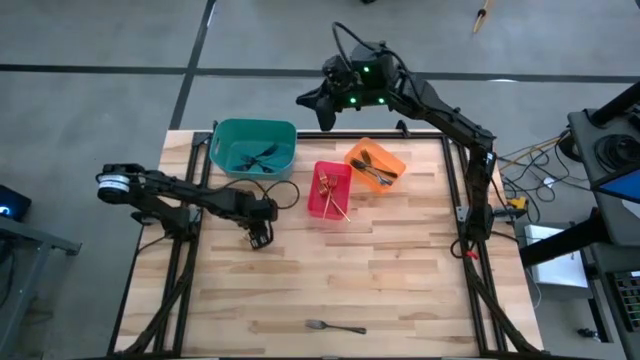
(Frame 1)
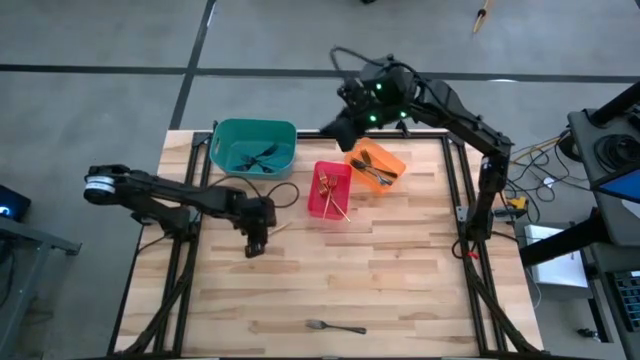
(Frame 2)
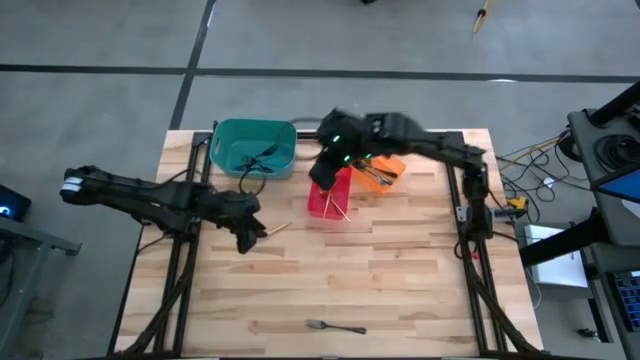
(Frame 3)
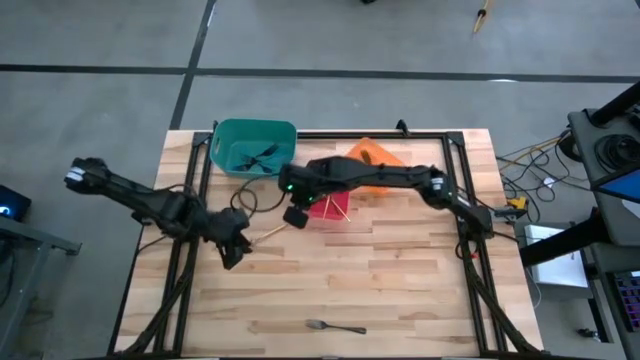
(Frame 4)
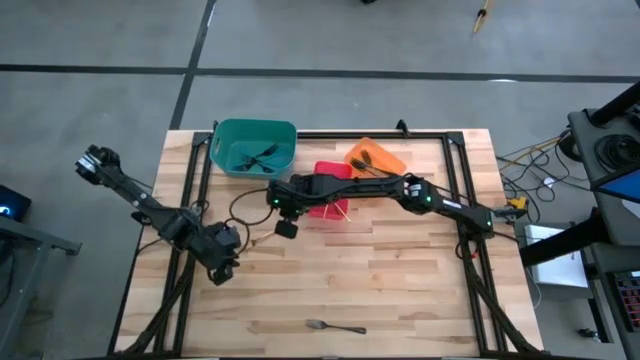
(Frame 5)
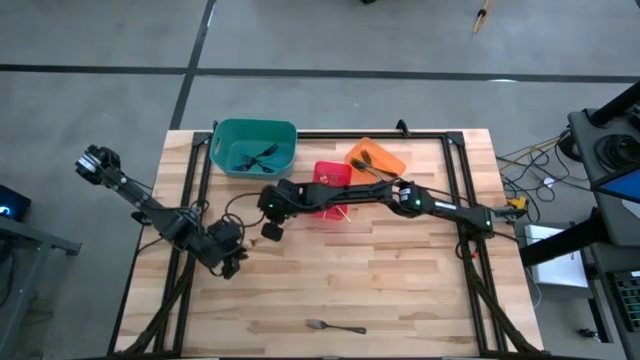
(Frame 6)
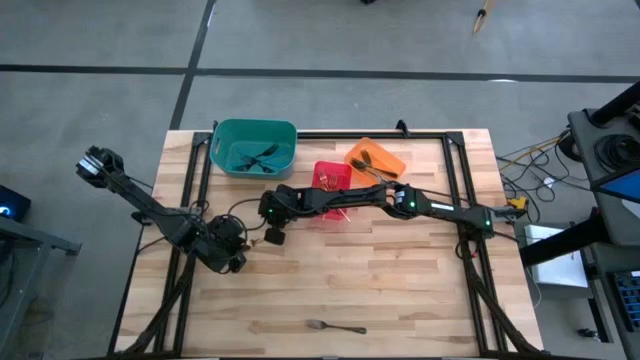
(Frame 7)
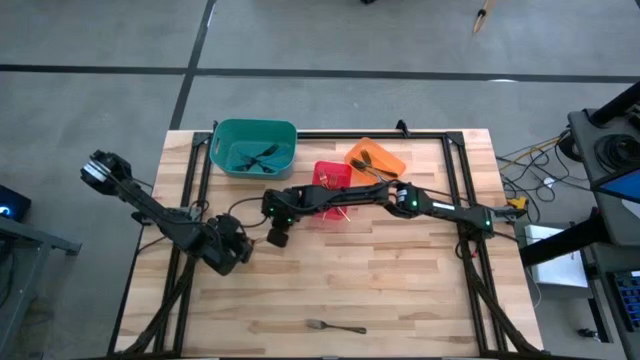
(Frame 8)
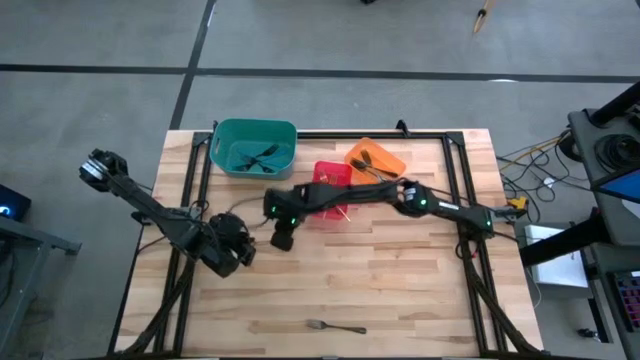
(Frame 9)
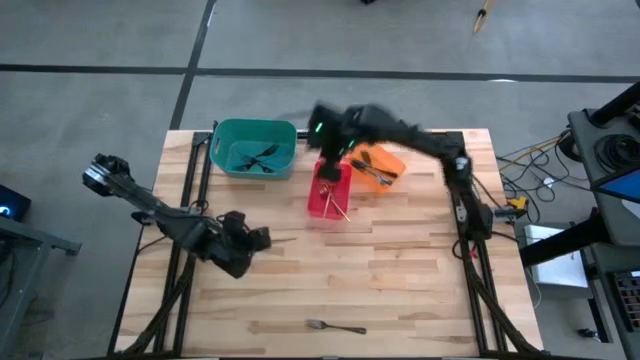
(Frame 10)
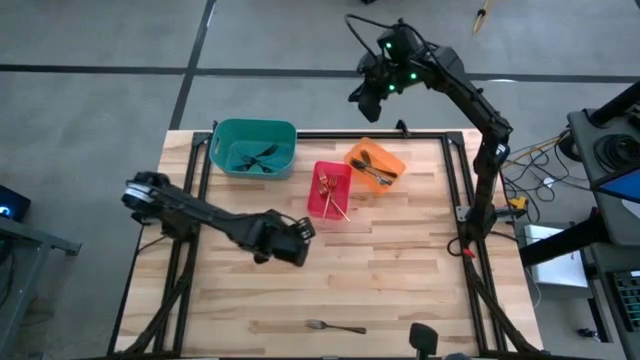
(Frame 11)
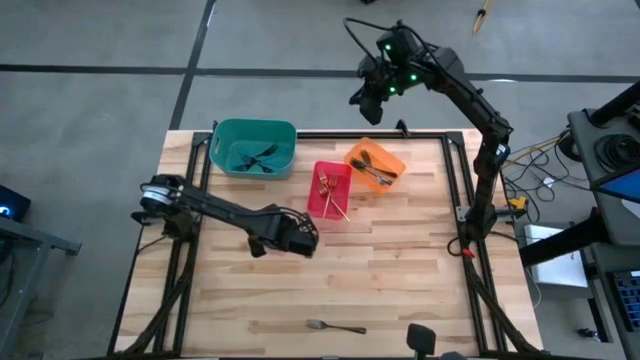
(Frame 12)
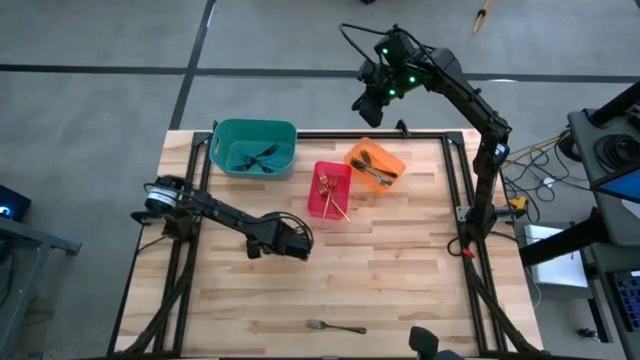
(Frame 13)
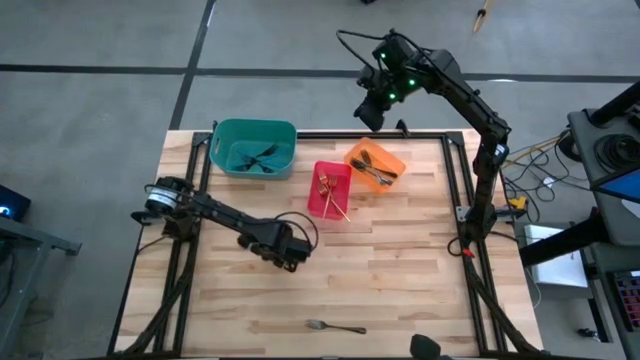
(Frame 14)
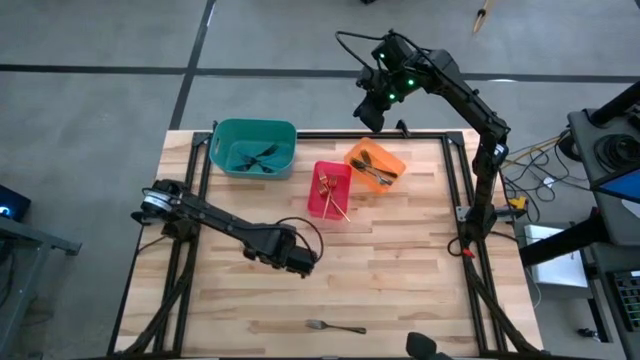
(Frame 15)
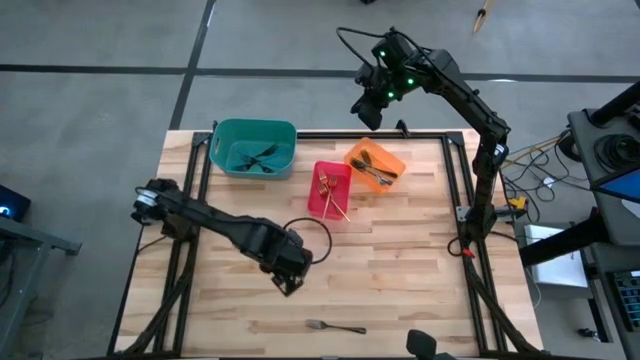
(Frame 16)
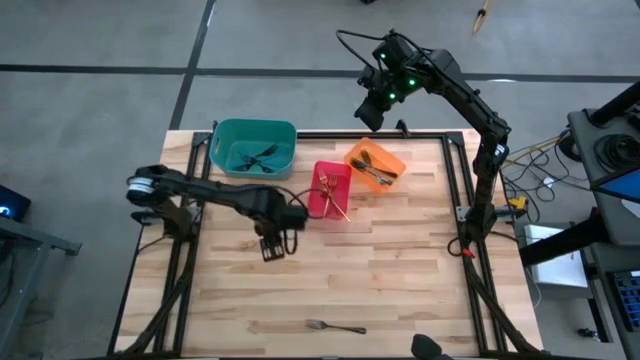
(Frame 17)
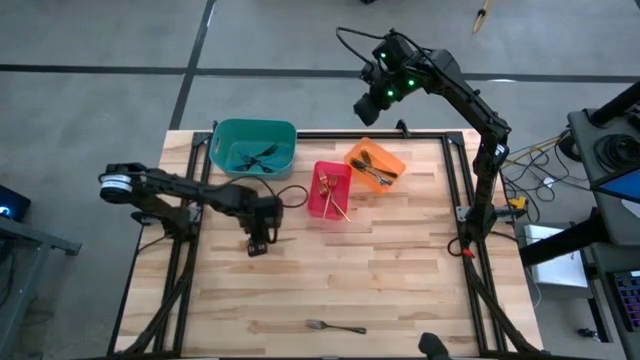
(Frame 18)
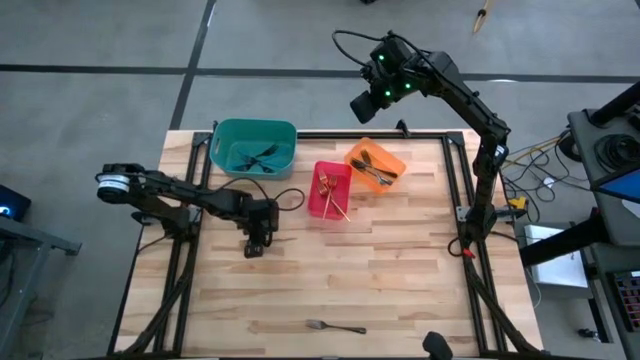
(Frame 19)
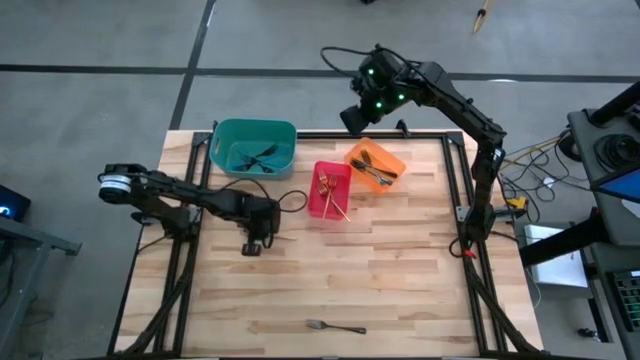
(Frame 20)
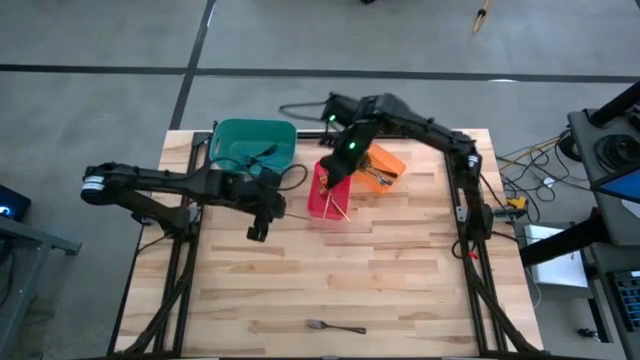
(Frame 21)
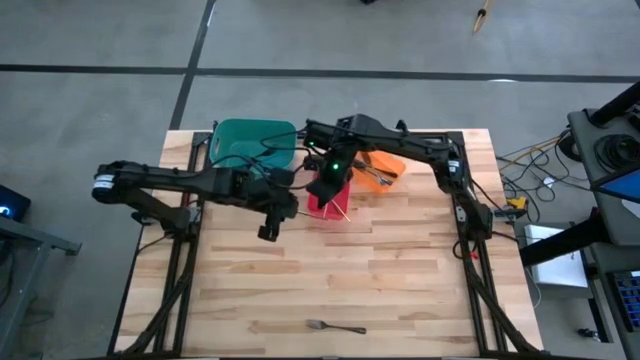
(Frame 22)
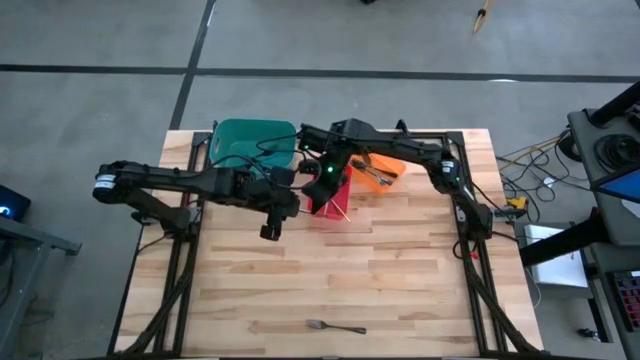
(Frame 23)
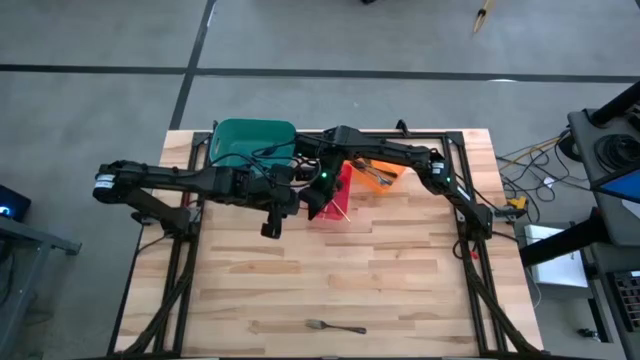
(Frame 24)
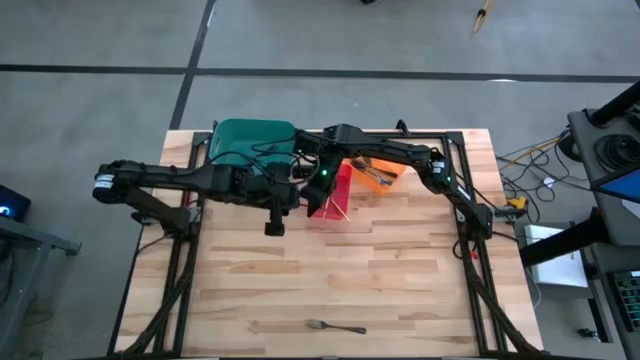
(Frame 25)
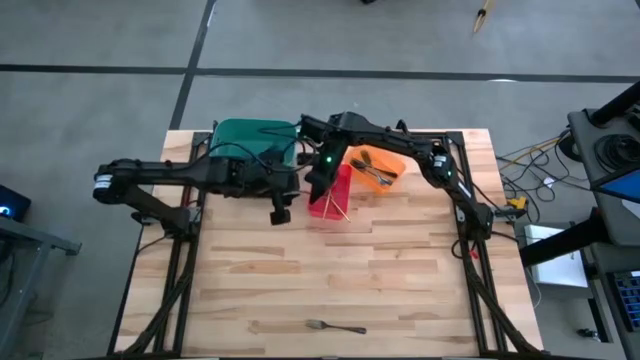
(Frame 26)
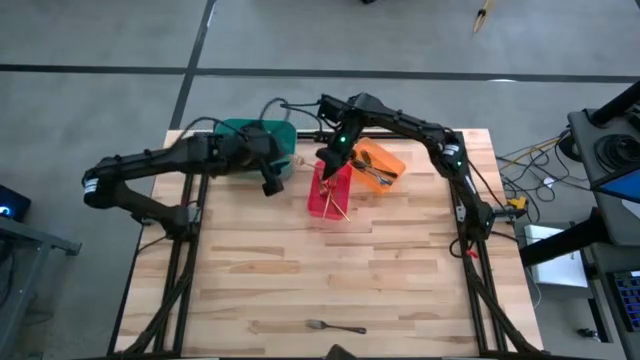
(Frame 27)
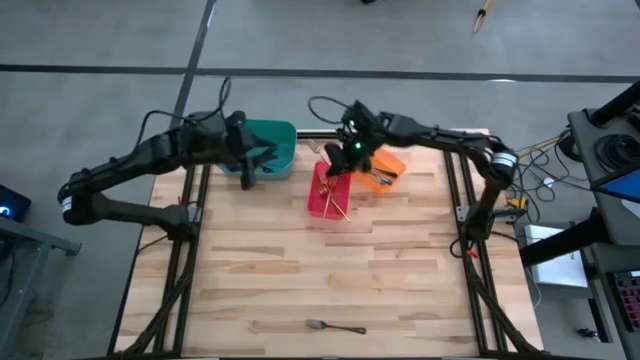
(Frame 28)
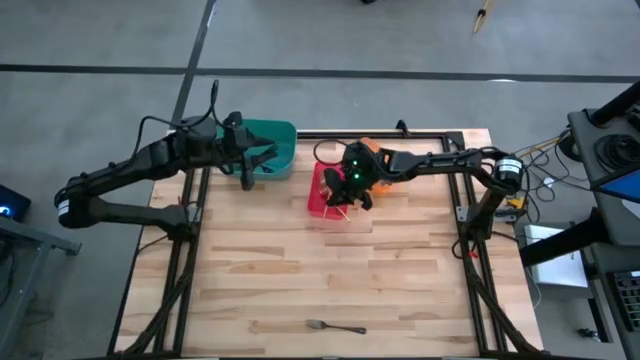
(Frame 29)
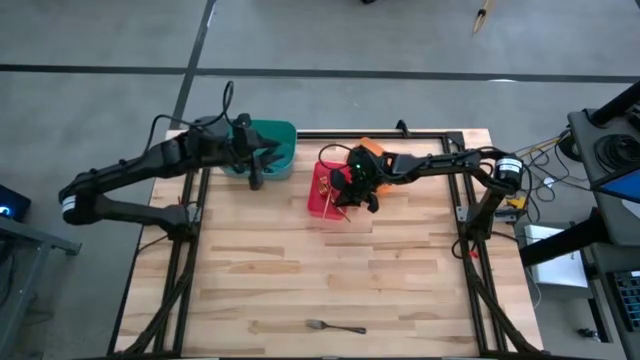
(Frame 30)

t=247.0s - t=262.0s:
Task: Sort silverware by color (type)
Put the golden fork into the red bin

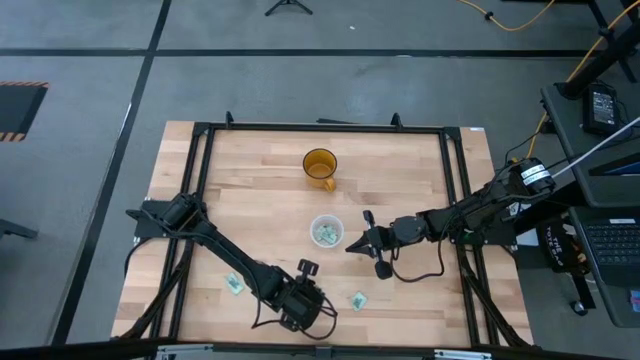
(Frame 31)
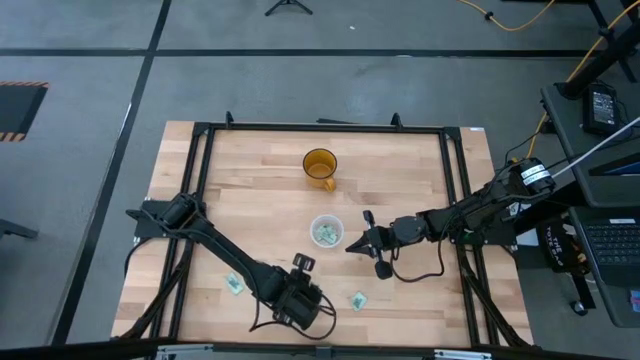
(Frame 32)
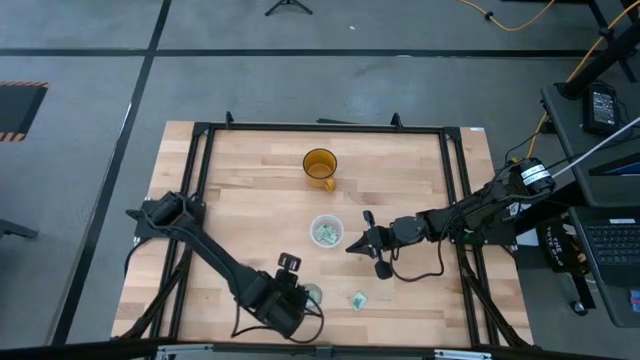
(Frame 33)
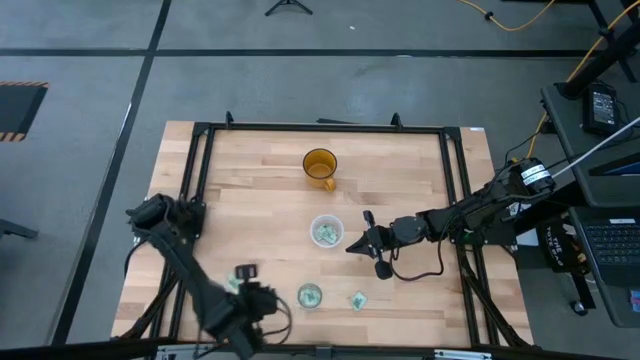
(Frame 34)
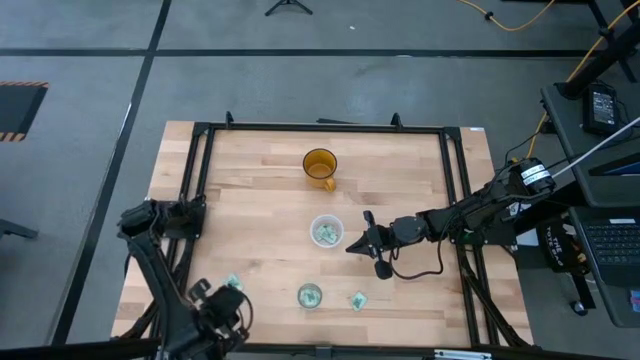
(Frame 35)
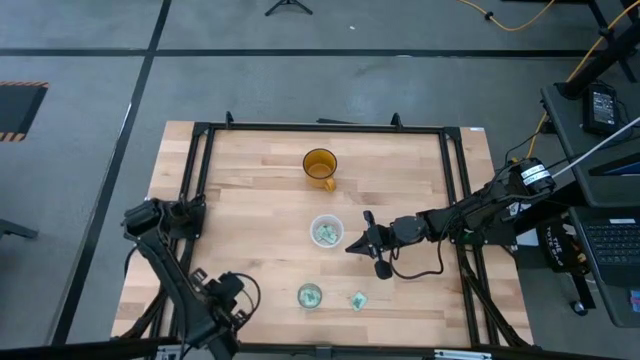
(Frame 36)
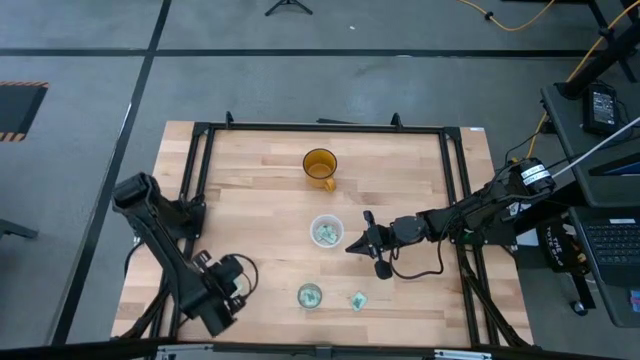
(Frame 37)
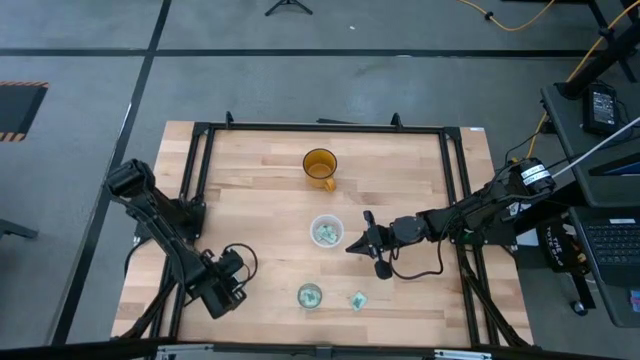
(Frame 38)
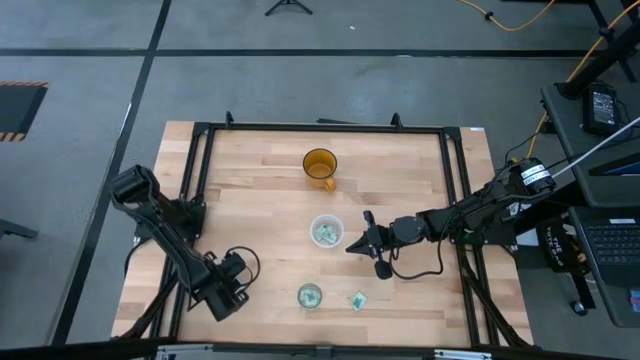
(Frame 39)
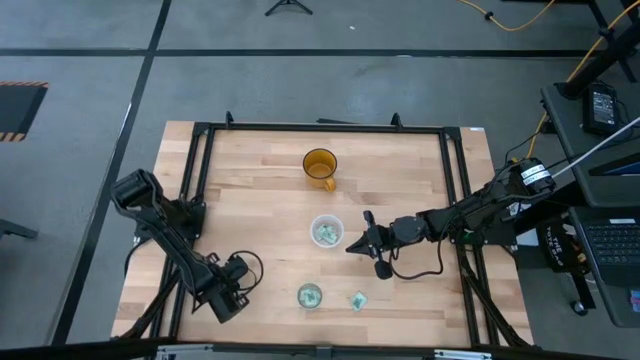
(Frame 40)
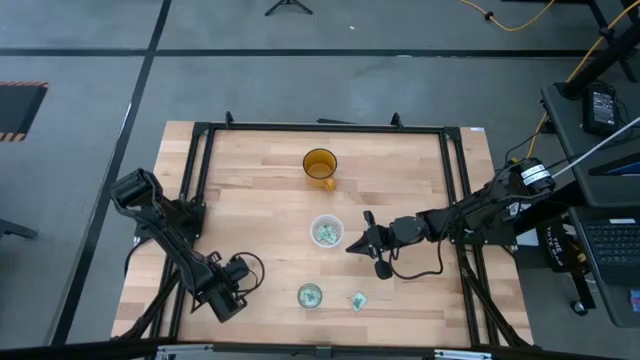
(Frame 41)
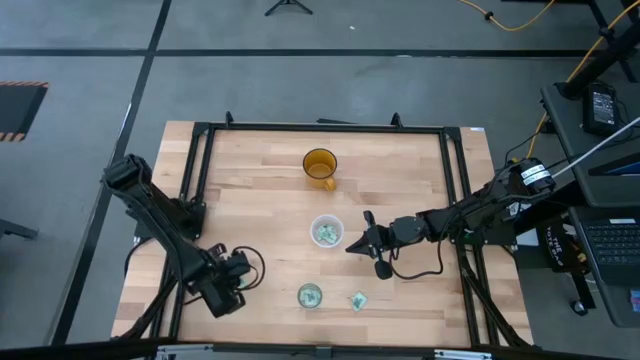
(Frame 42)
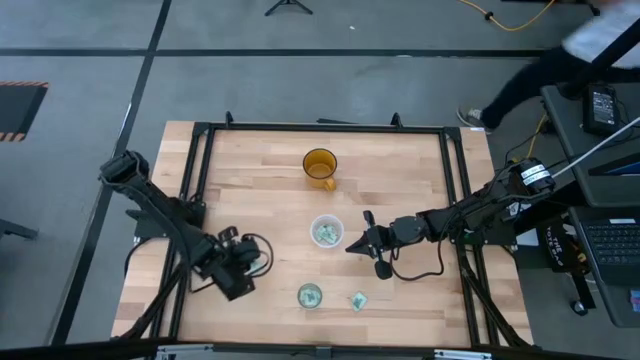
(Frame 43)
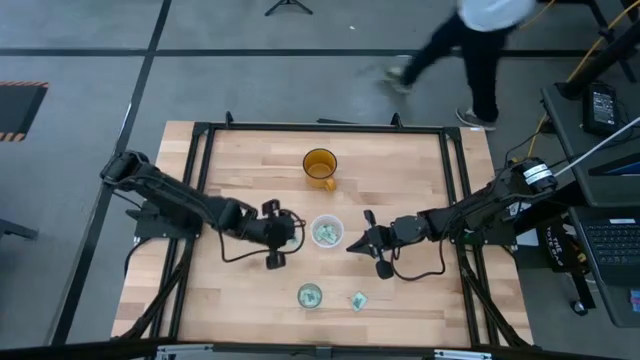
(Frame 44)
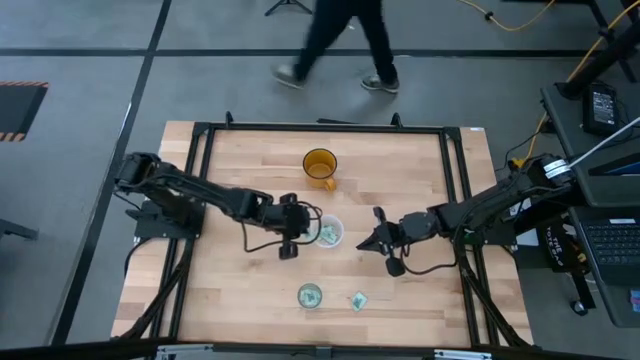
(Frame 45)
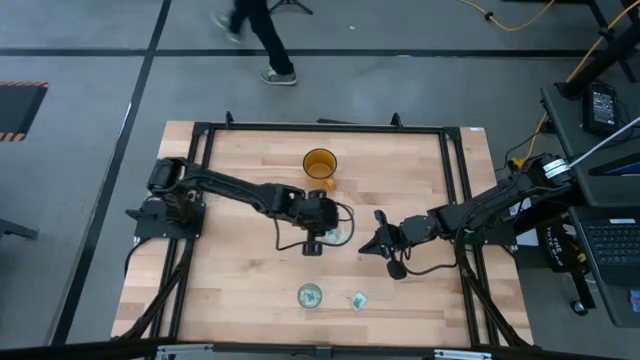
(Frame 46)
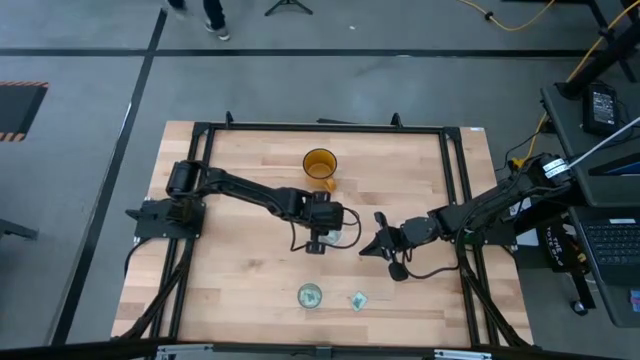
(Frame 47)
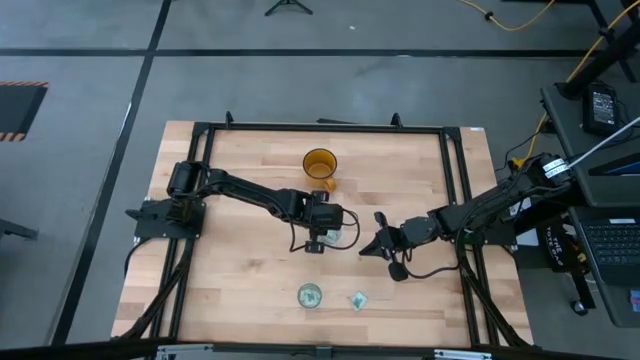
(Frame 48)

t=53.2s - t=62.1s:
Task: Pick and place Stevia / Truvia into bins
Put the stevia packet into the transparent plastic container
